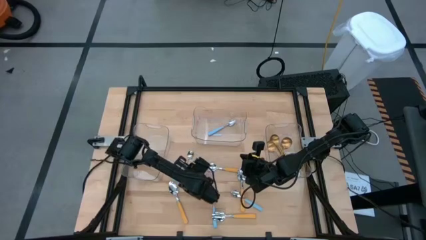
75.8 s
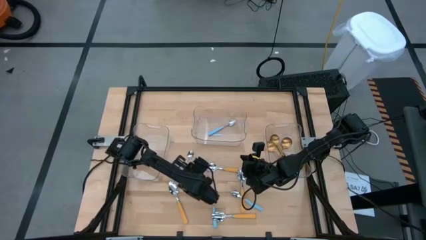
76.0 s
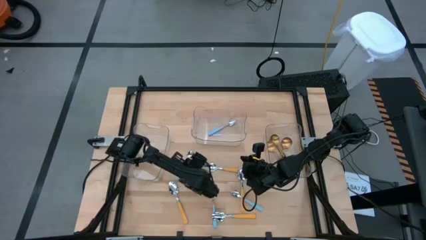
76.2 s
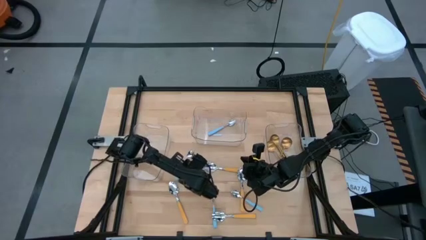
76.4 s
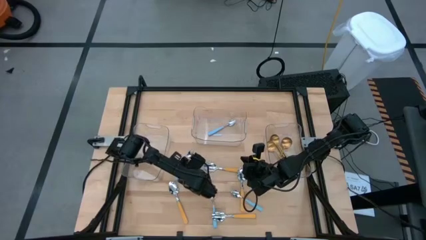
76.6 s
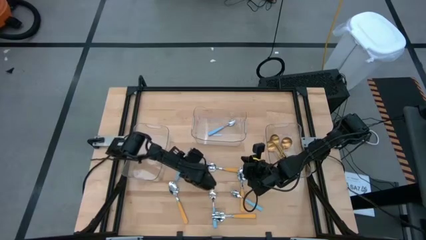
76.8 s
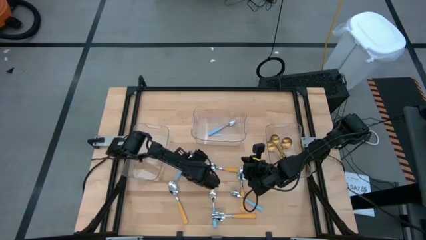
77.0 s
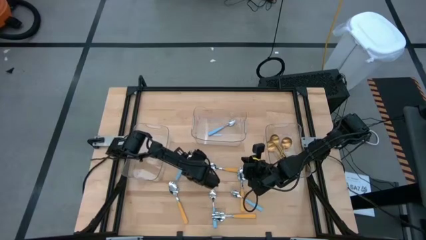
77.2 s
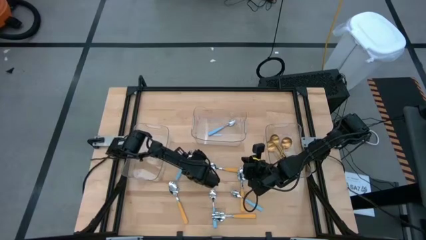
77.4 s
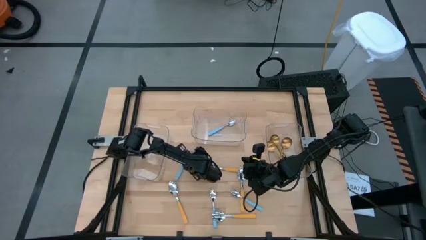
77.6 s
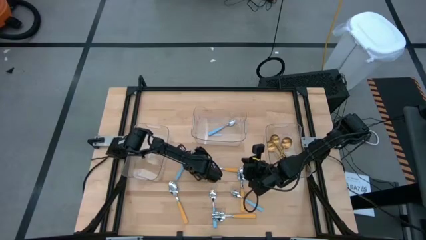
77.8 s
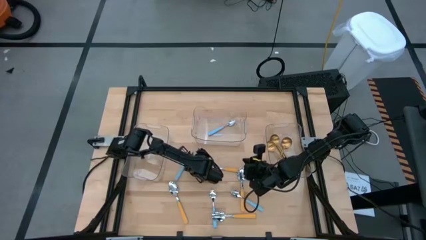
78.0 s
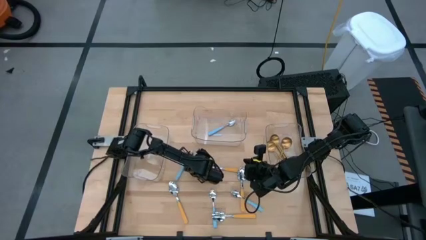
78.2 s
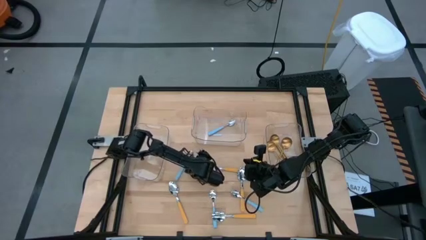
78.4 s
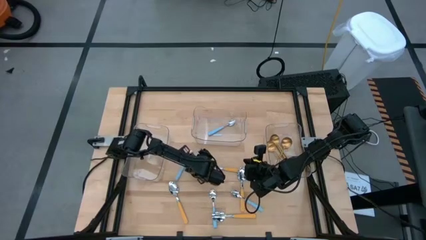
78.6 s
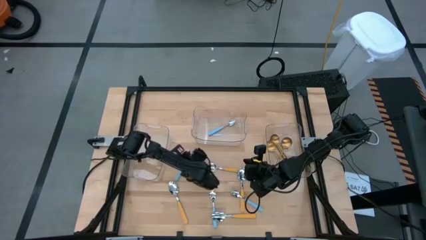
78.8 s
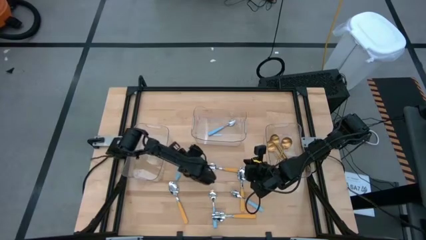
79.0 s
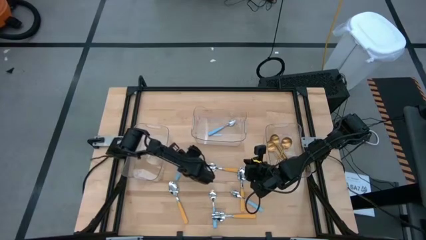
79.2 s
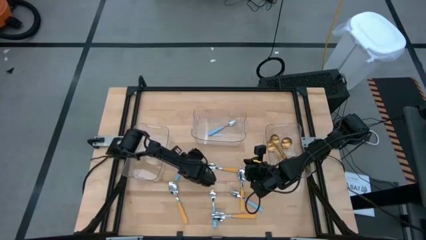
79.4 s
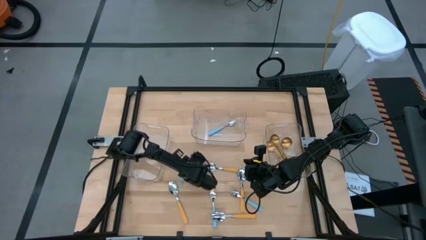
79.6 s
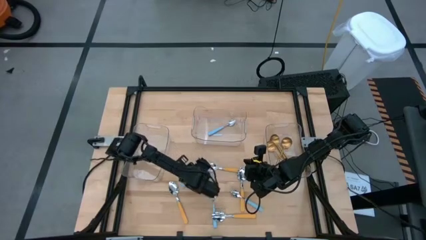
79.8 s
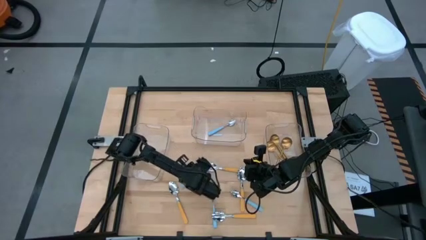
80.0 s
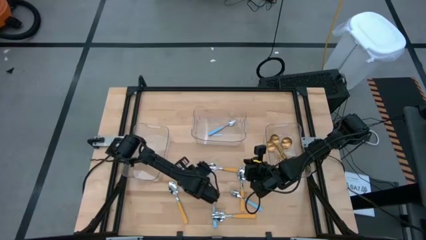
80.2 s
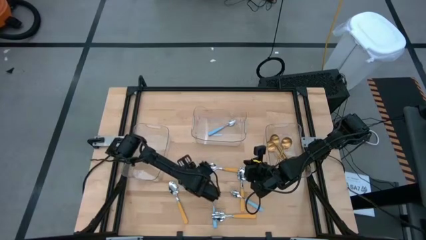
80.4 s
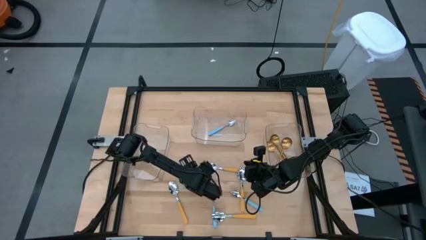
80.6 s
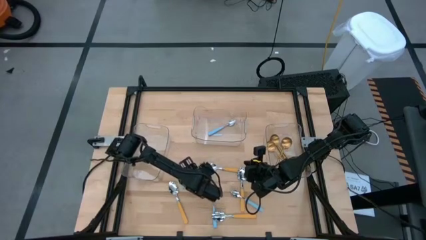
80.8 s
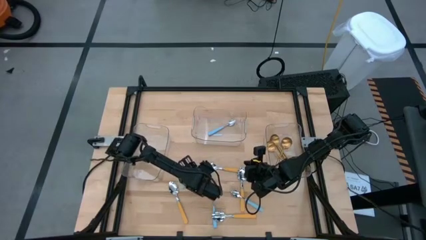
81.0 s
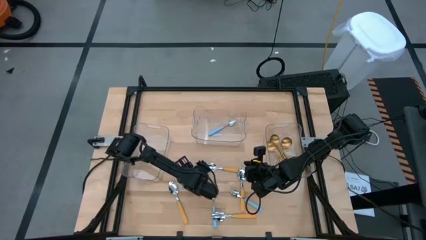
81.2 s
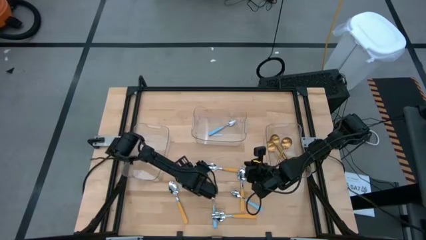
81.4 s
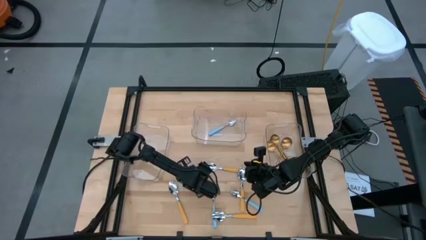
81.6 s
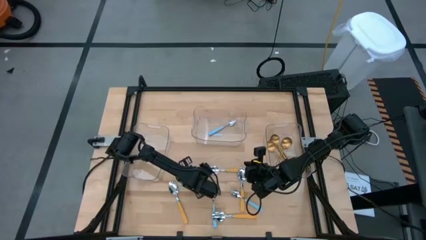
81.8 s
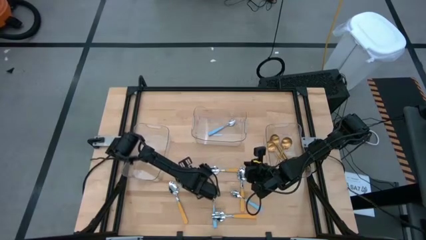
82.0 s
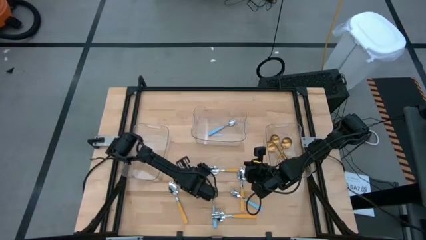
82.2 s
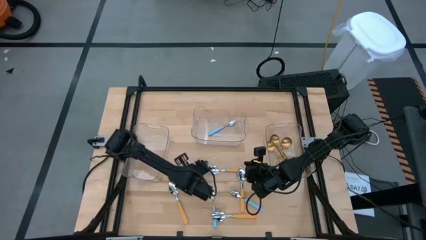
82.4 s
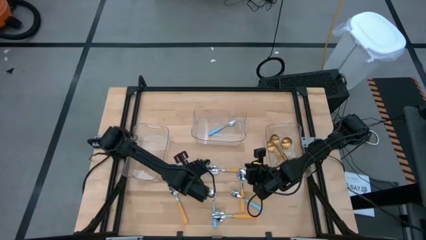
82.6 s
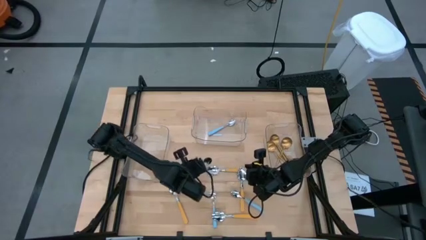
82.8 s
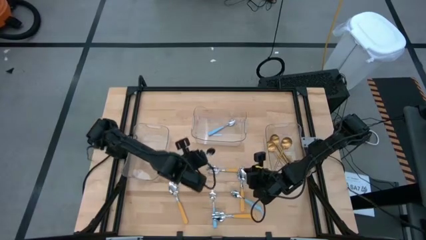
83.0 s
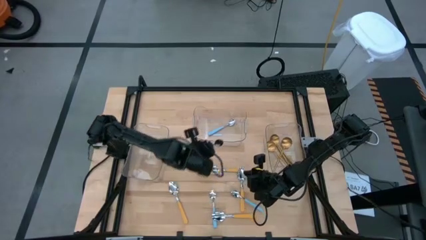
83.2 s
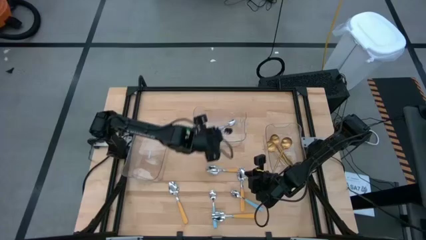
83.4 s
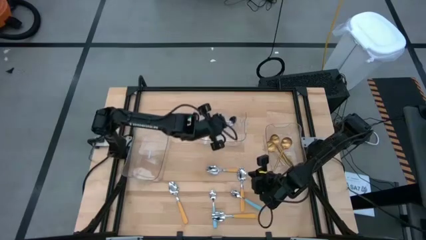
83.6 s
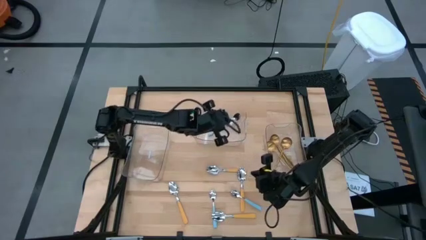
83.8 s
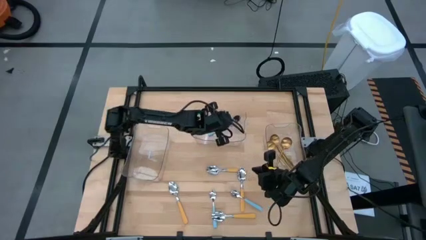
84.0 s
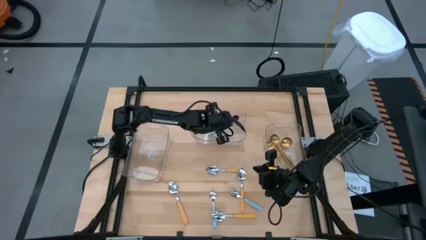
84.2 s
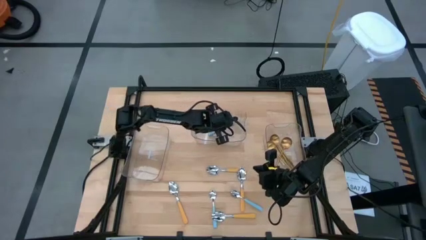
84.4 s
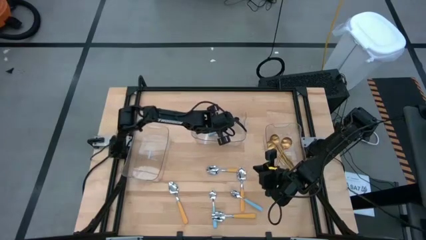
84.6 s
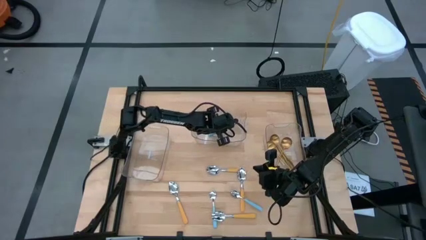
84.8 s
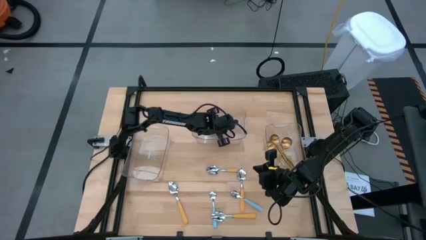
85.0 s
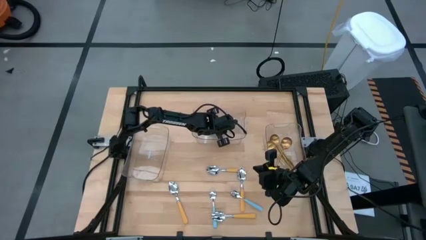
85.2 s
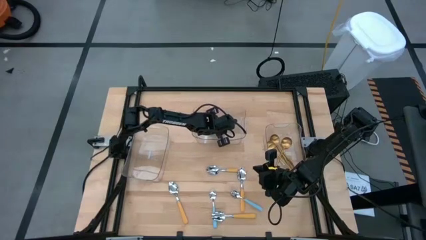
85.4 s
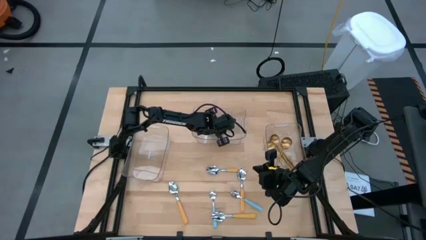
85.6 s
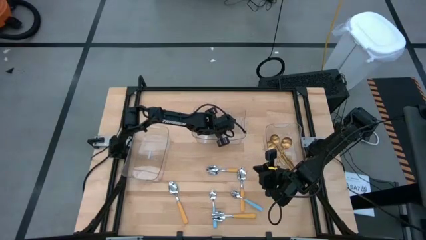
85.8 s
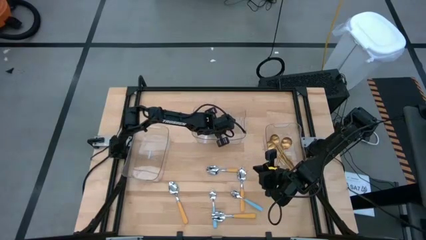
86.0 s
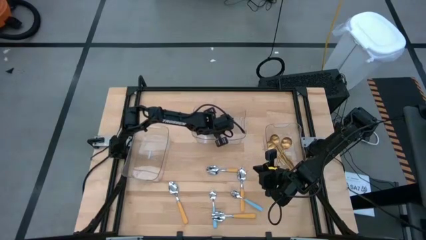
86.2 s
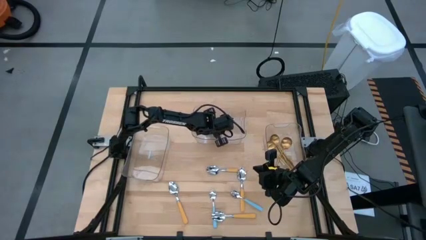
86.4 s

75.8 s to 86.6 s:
Task: Sort silverware by color (type)
Put the blue spoon into the top transparent bin

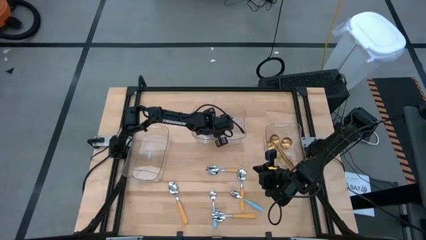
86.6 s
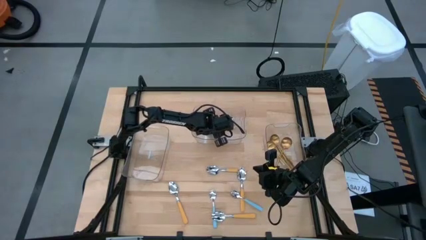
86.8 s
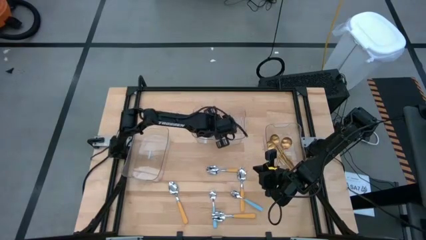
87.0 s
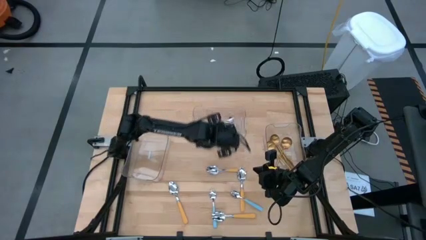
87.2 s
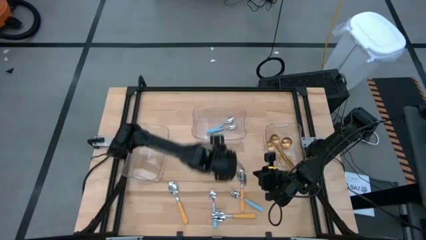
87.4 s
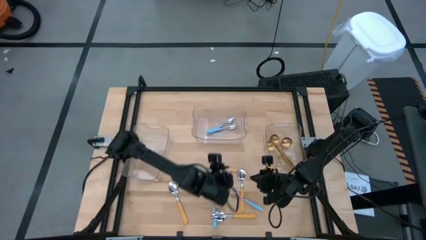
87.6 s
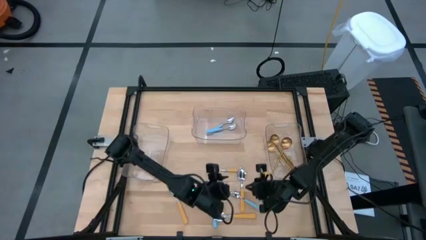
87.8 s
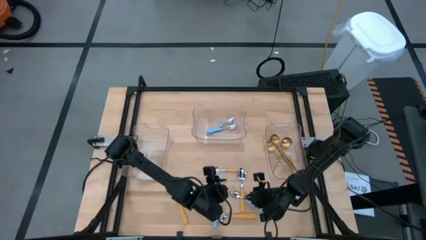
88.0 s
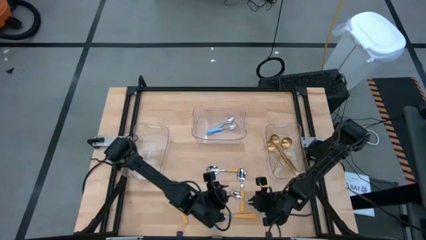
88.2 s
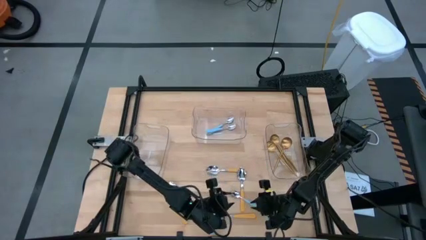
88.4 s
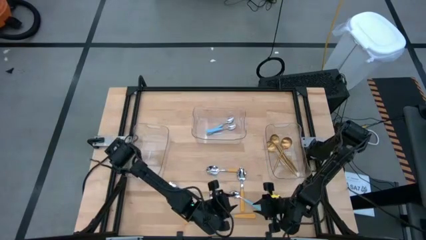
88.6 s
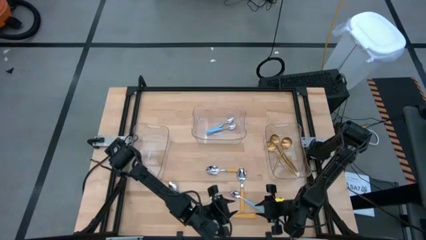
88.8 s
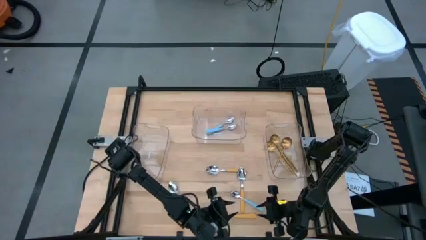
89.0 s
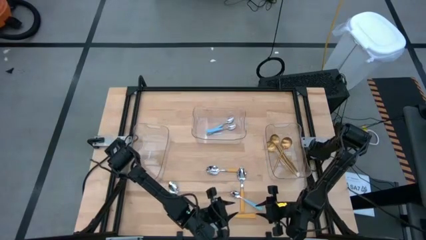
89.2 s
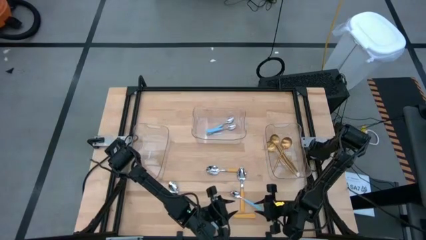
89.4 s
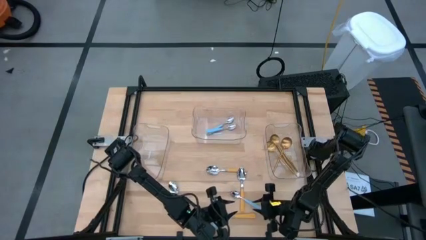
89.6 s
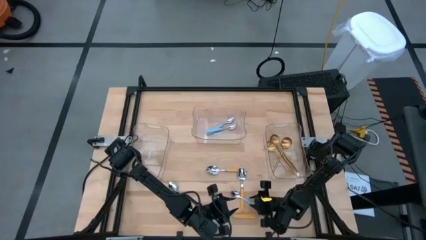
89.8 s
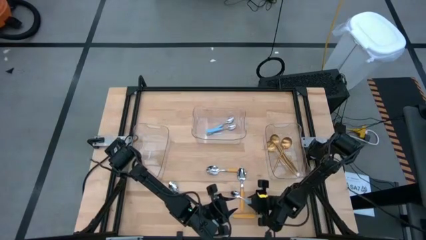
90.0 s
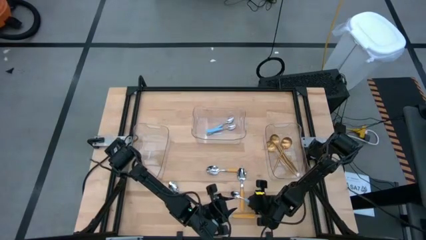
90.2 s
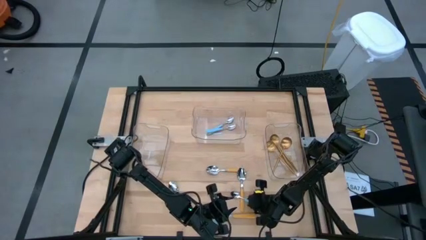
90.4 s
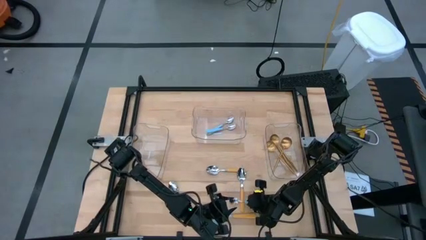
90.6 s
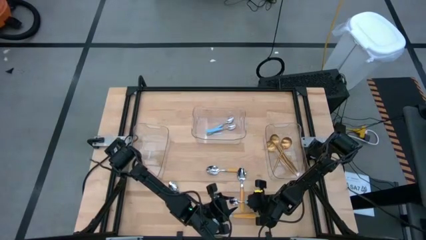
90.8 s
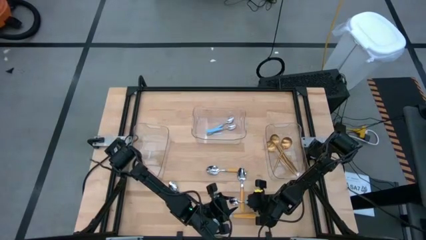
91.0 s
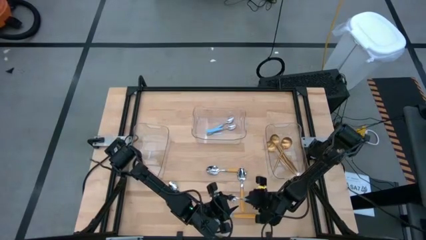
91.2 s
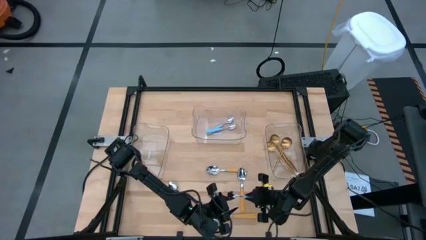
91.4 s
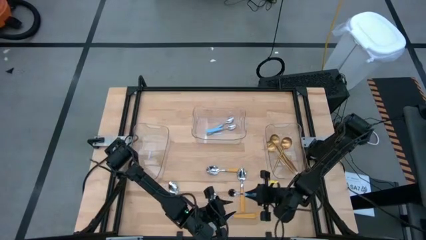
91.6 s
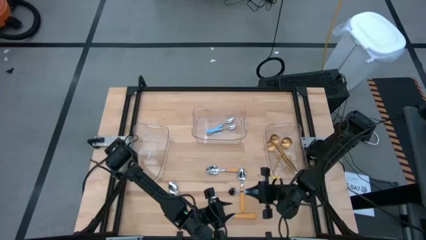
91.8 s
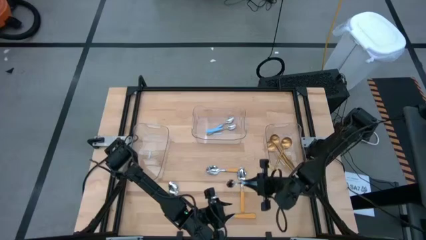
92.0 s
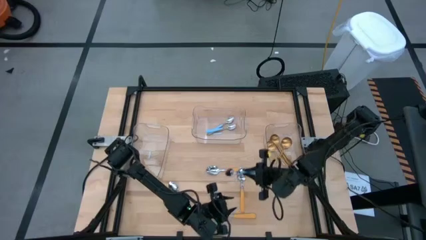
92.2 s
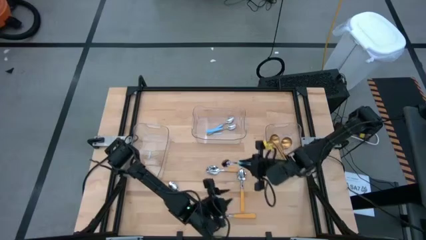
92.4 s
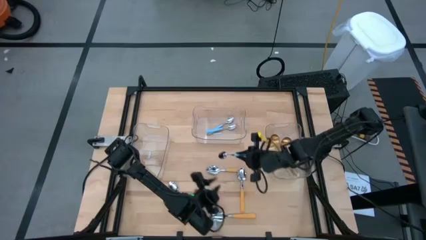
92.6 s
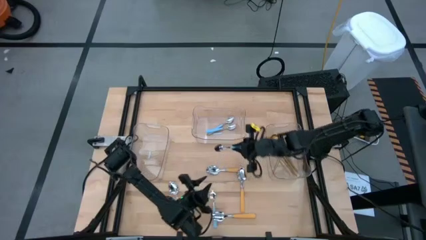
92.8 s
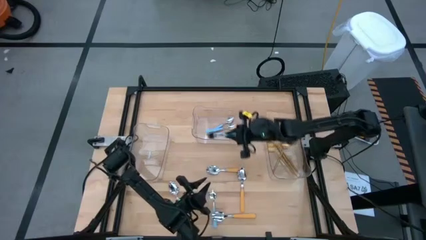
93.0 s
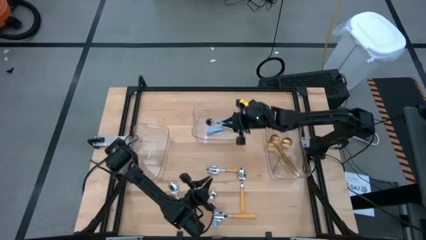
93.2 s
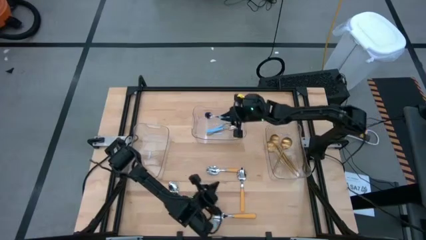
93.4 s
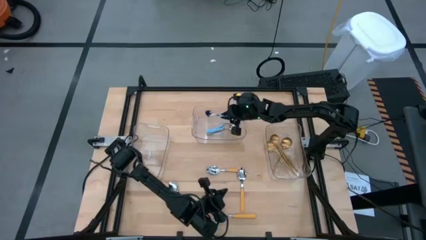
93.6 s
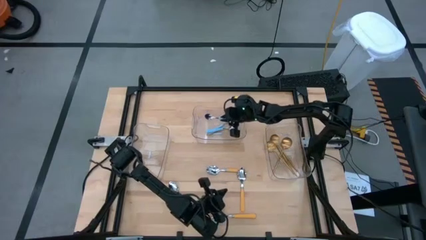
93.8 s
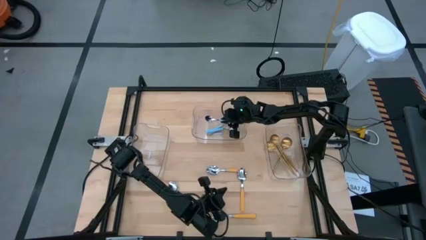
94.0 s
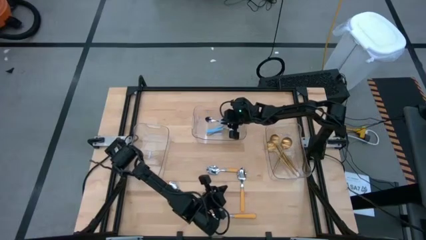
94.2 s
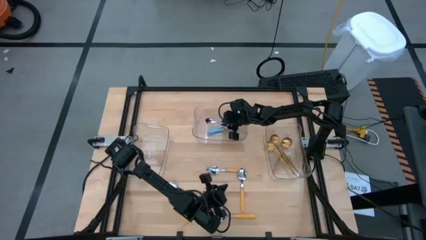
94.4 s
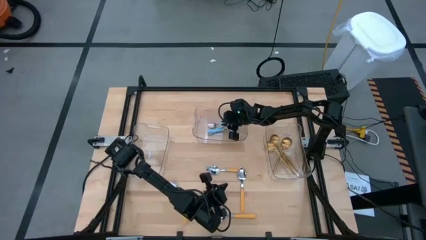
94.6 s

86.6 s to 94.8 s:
Put the blue spoon into the top transparent bin
